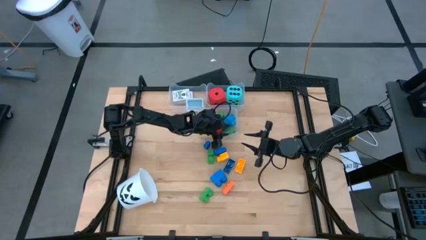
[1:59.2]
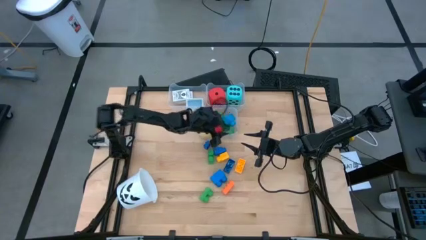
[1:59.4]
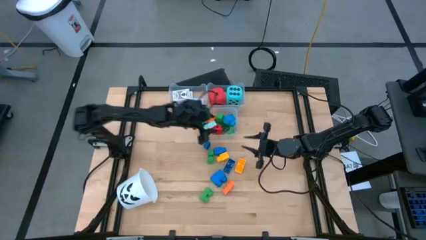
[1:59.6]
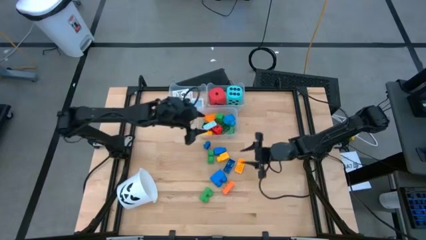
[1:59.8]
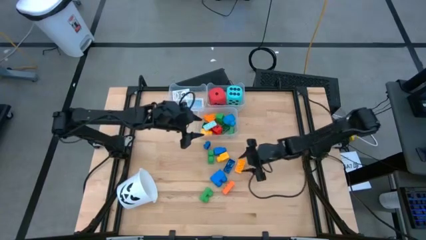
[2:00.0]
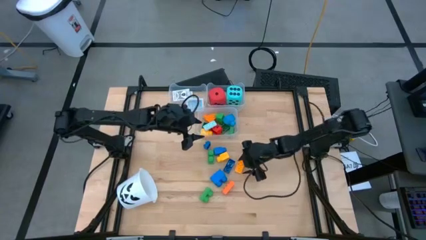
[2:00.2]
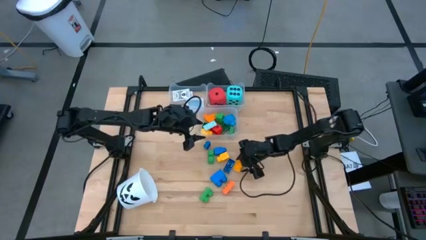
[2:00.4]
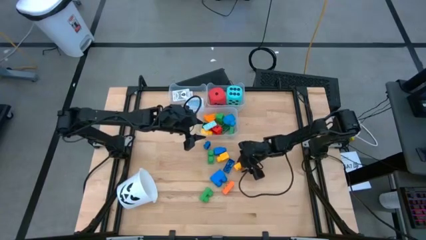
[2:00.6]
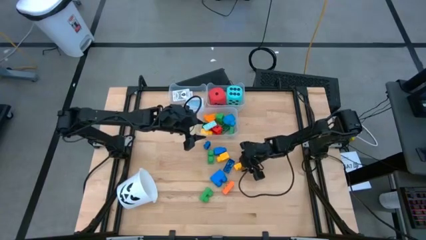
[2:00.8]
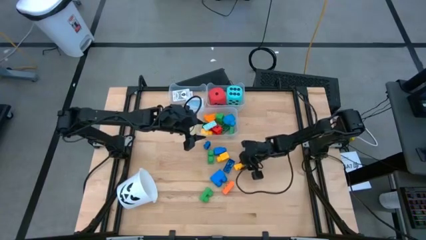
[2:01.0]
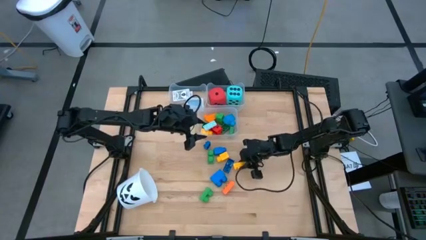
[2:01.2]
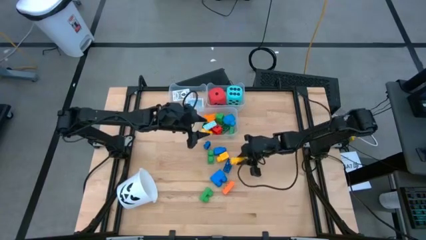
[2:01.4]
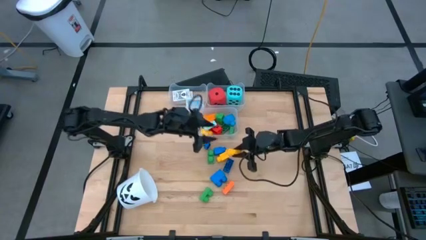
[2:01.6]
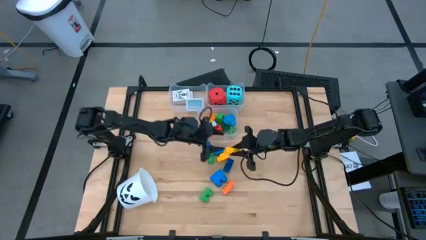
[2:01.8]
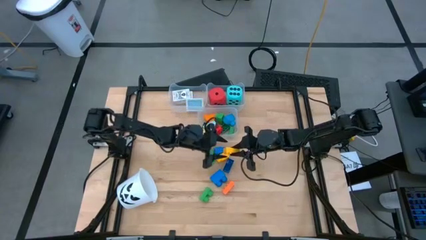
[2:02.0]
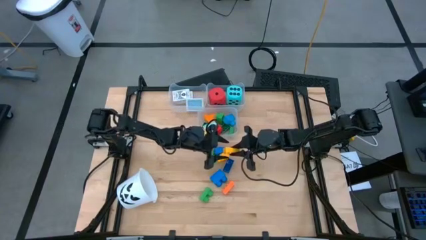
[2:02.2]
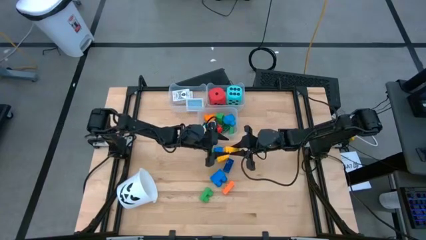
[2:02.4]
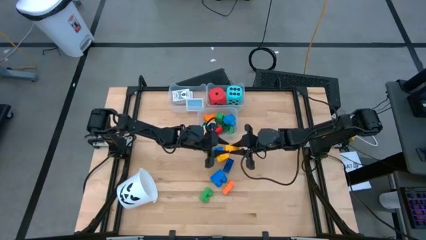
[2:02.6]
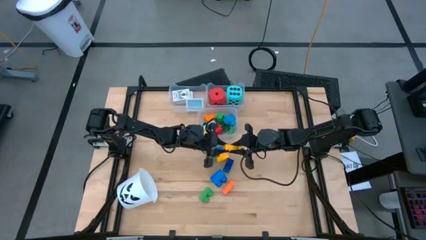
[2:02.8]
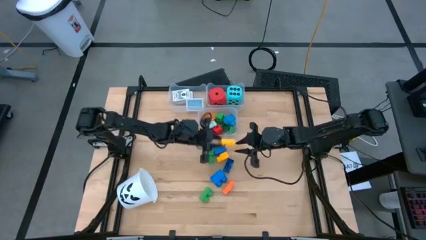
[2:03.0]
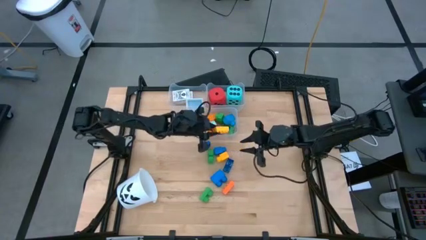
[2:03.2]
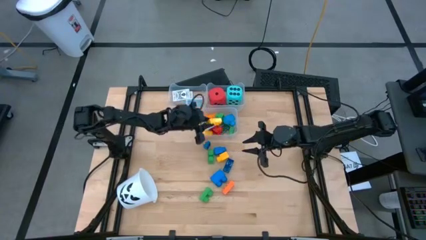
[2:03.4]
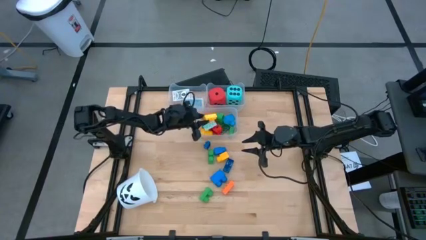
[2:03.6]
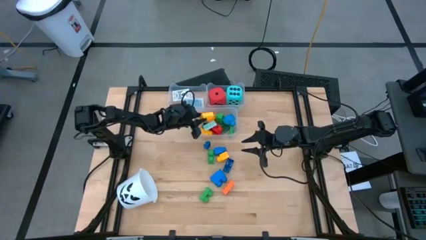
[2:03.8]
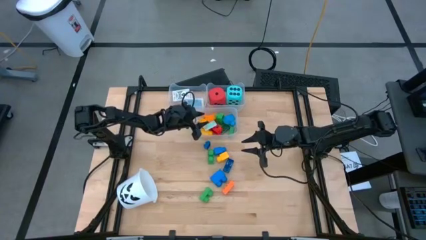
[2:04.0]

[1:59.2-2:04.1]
Task: Pick & Place Toys
Put the right yellow game piece into the bottom transparent bin

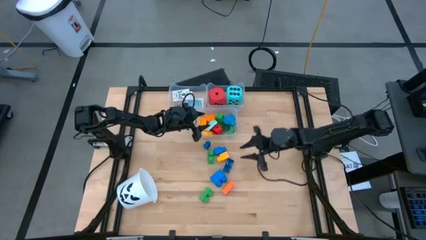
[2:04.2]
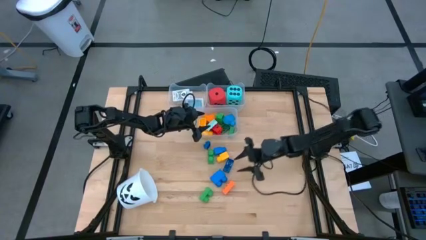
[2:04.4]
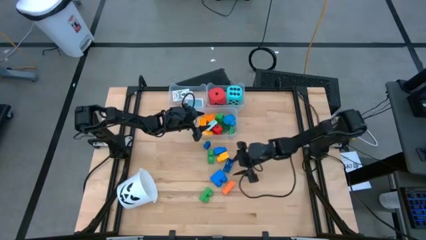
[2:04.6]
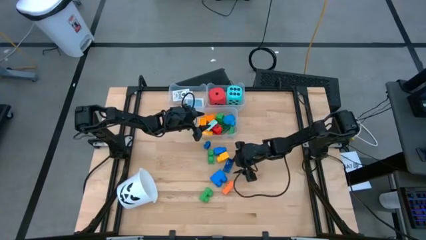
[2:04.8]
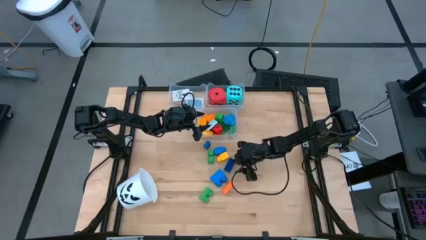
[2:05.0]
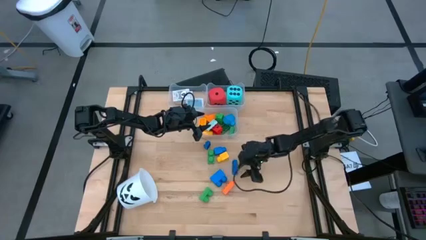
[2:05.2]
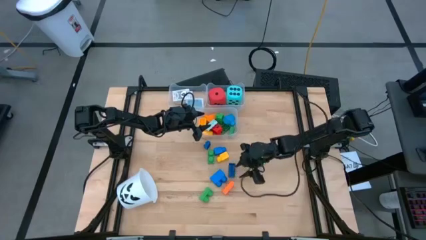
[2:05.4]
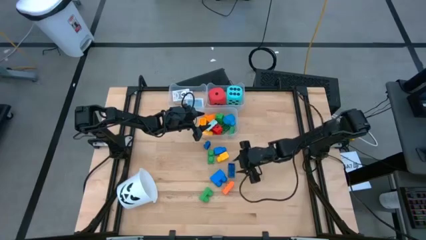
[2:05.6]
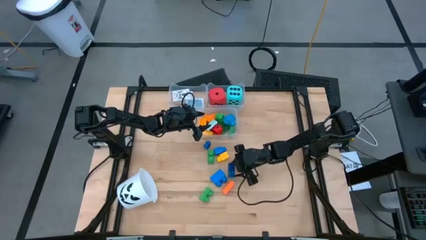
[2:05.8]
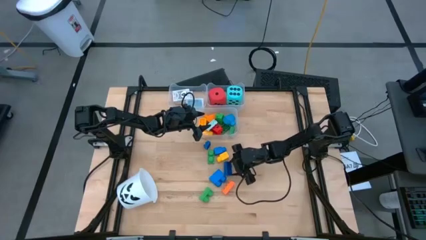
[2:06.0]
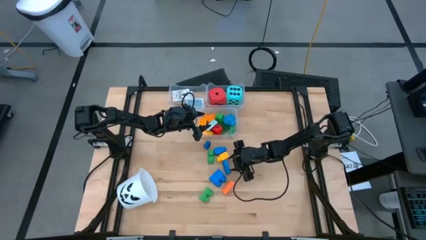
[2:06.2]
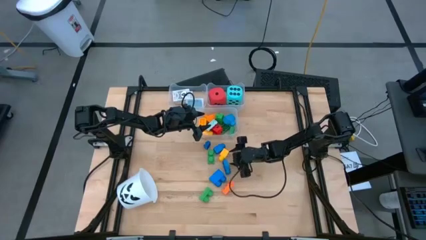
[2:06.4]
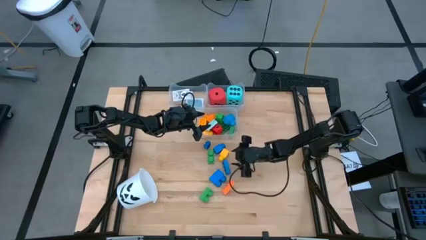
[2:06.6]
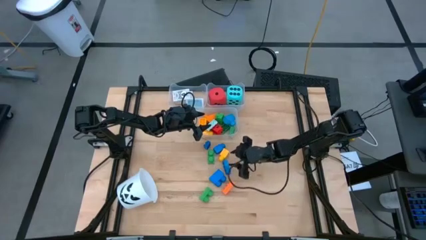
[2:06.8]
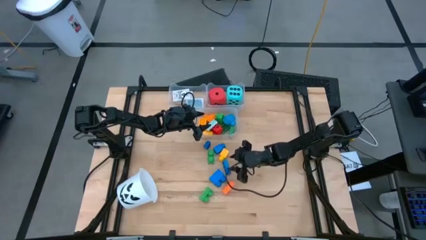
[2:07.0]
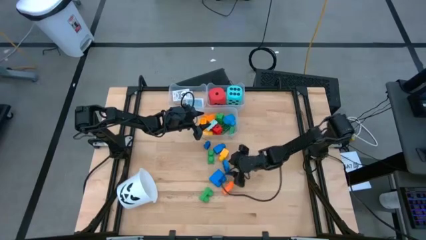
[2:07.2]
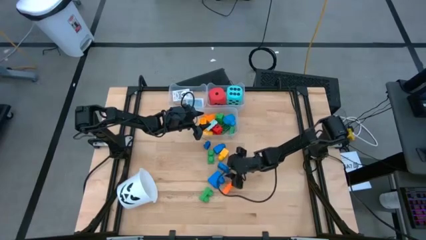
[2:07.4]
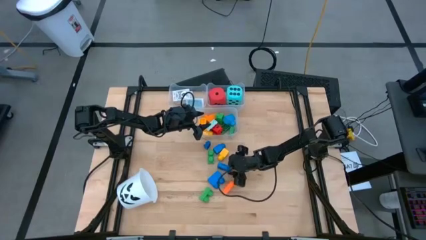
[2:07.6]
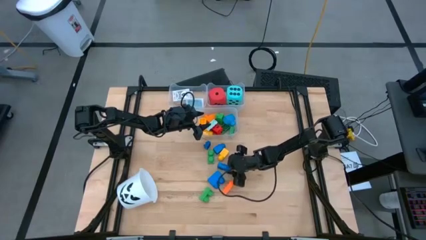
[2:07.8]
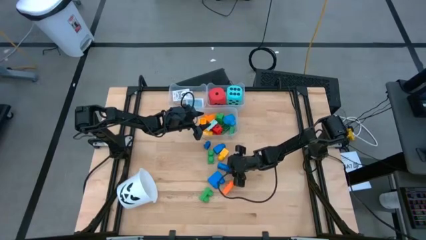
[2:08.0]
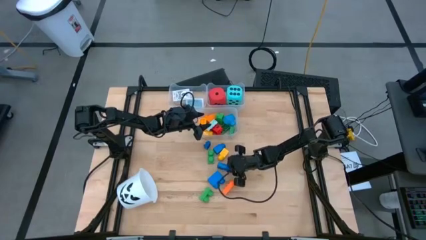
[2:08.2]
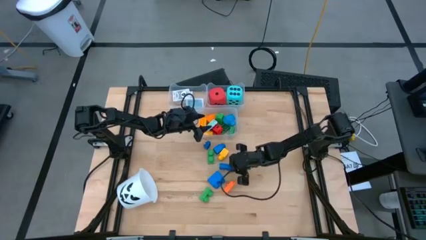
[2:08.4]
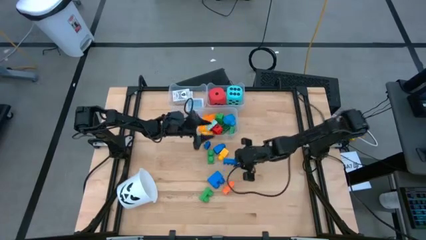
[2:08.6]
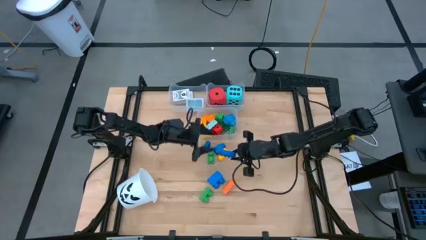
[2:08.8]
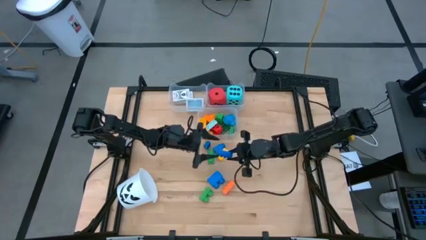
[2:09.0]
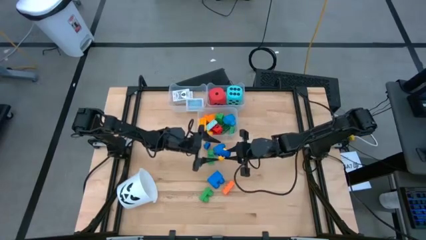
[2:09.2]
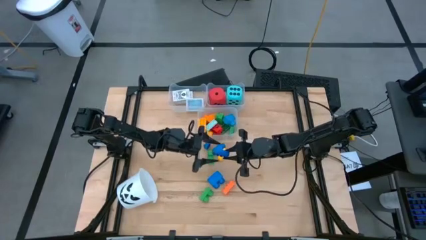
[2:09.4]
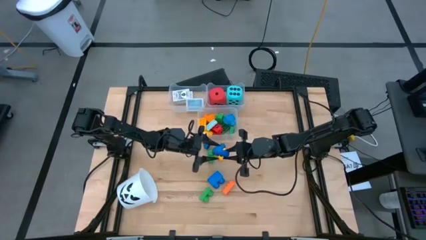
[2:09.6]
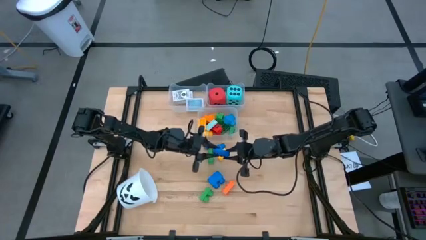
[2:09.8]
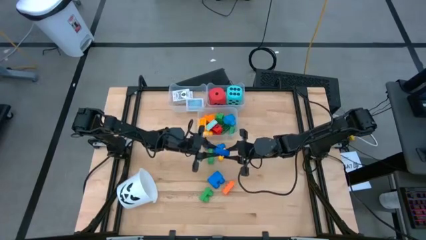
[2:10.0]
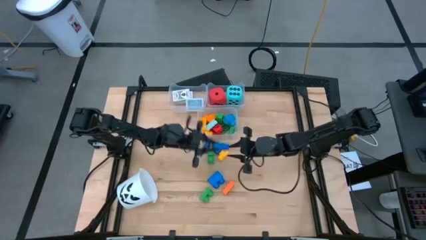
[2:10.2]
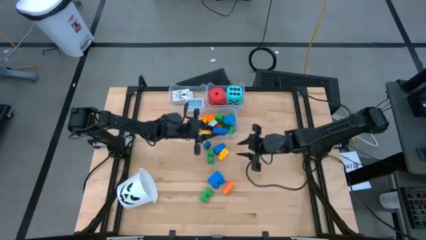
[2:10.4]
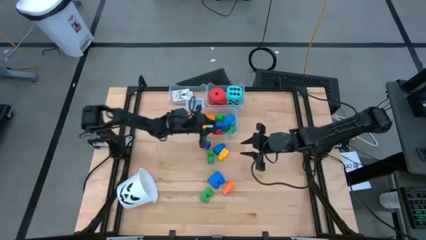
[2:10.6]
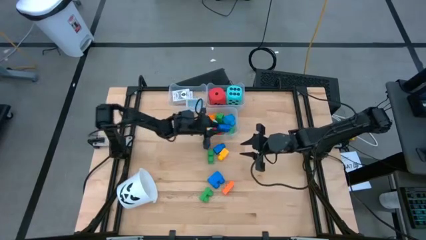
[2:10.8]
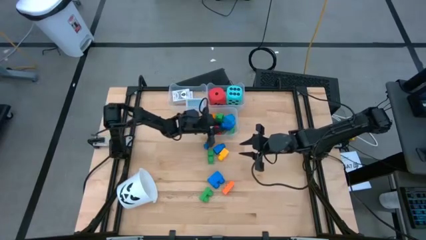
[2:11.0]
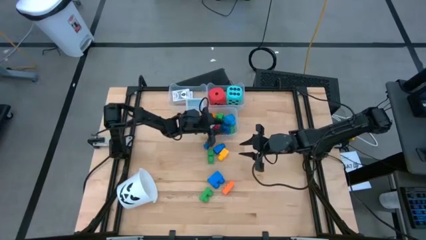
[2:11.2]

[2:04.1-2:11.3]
Put the blue game piece into the bottom transparent bin

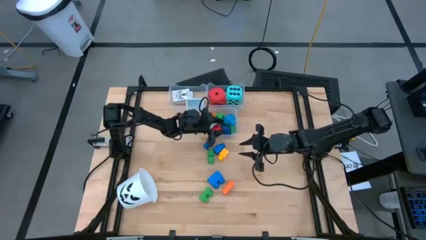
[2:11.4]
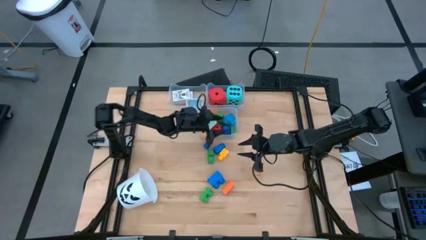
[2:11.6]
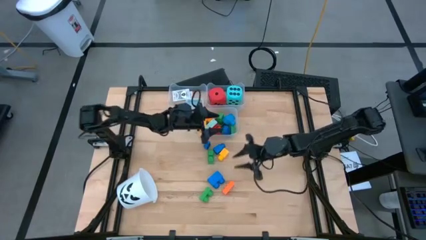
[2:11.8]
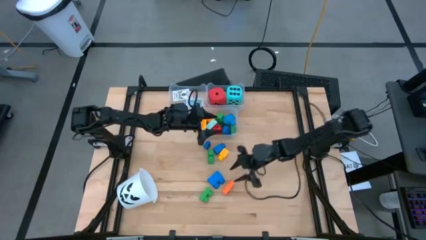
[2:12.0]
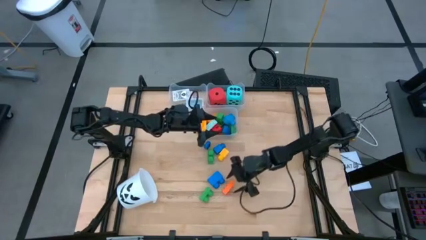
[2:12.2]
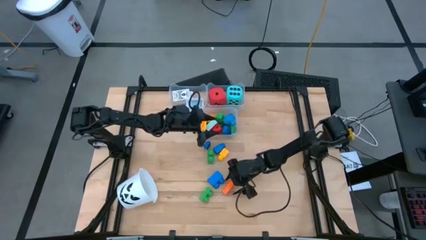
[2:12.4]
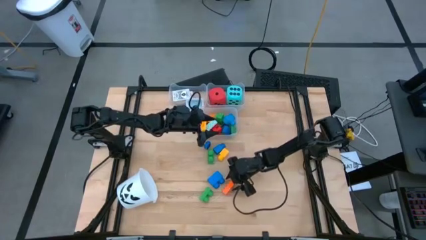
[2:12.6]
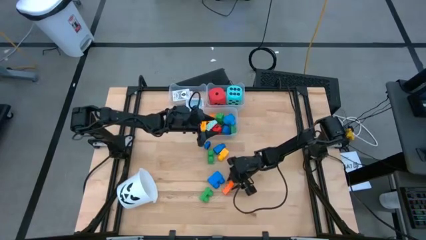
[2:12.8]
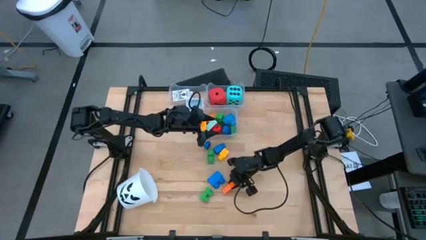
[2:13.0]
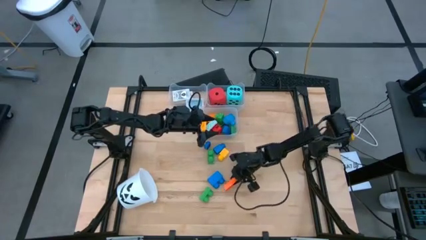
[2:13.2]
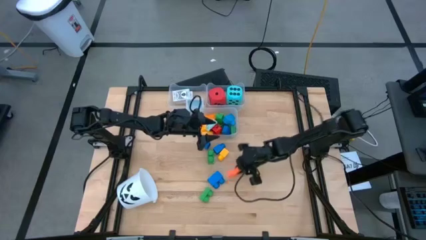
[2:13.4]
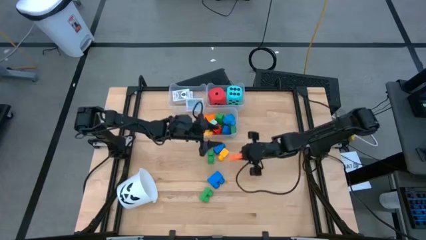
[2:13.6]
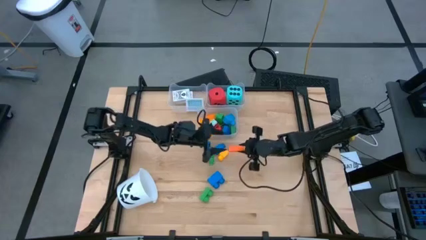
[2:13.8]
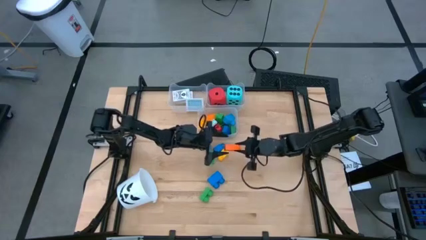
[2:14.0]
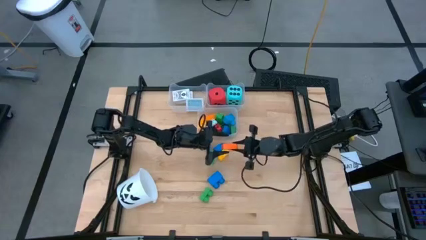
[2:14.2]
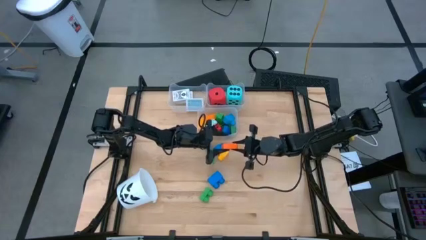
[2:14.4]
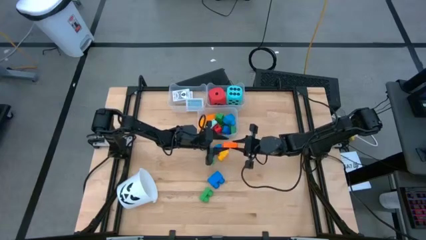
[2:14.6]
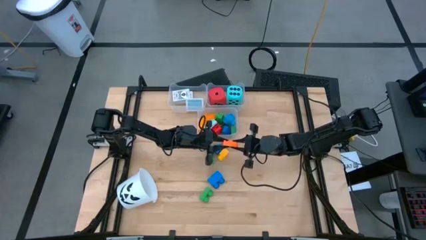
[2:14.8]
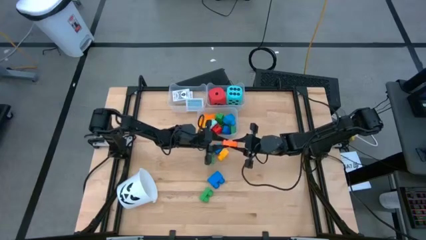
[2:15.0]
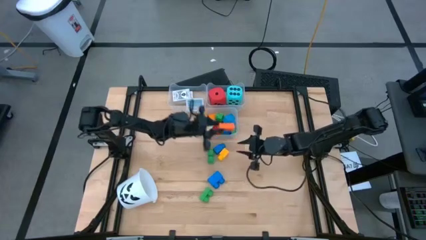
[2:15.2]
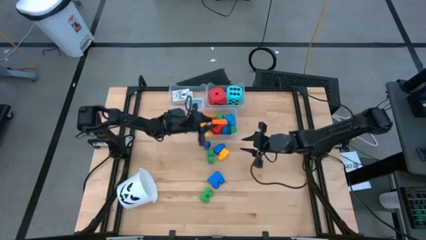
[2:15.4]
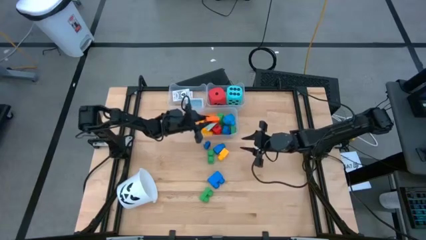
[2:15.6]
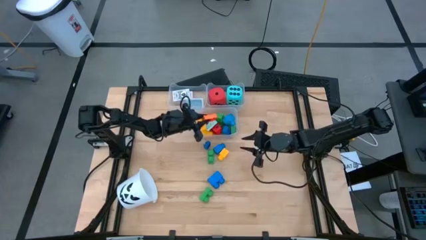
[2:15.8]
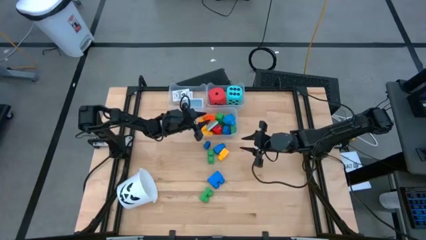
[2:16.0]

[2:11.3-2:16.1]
Put the orange game piece into the bottom transparent bin
